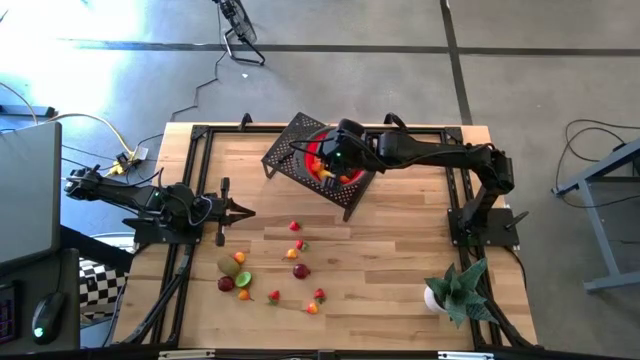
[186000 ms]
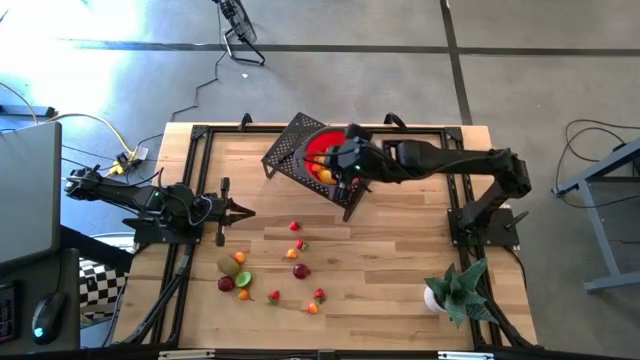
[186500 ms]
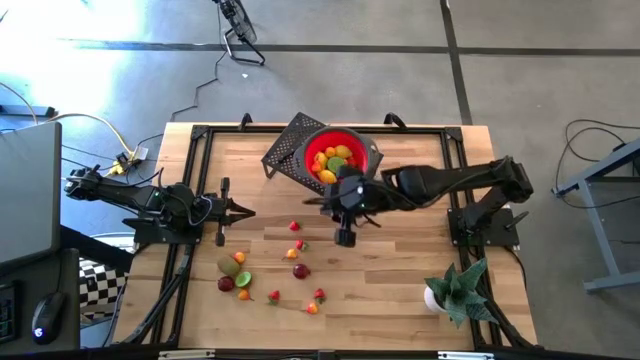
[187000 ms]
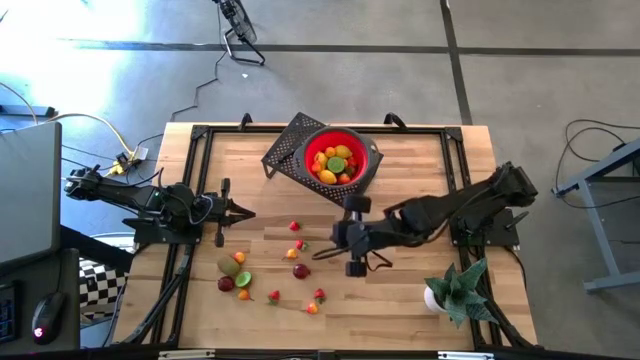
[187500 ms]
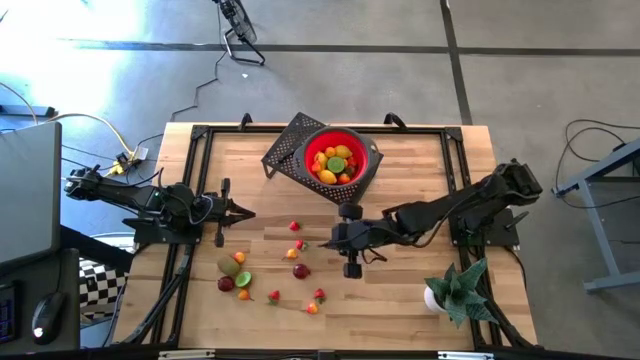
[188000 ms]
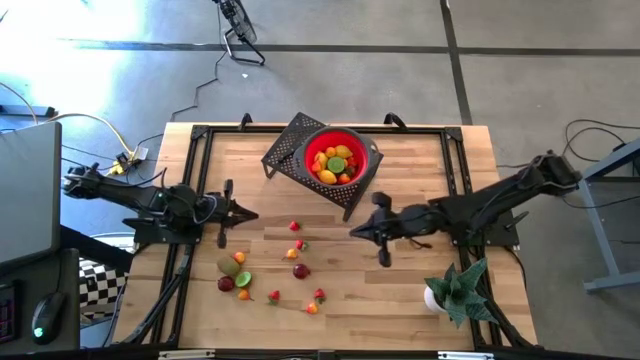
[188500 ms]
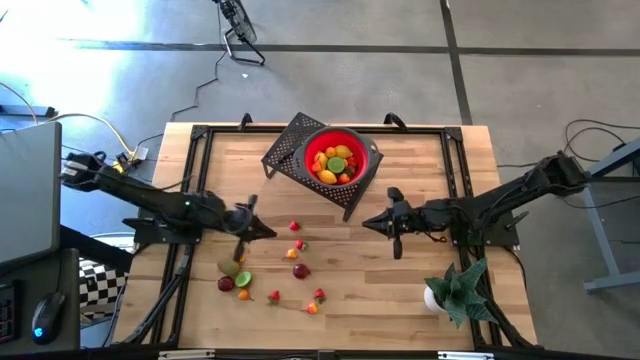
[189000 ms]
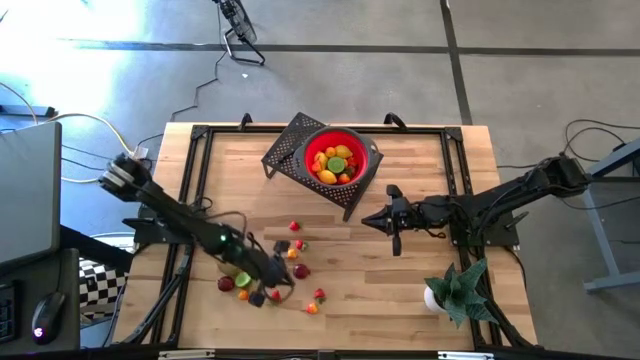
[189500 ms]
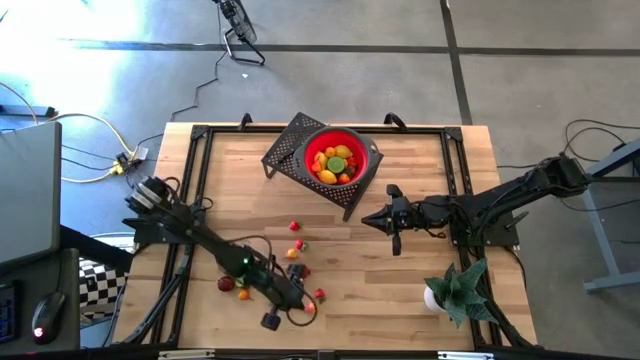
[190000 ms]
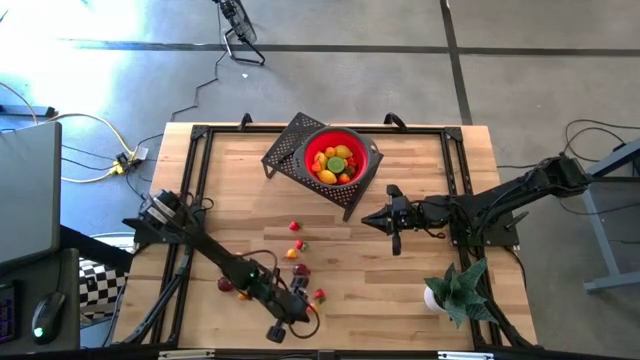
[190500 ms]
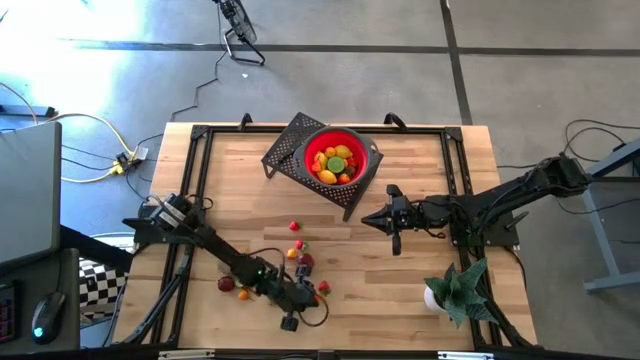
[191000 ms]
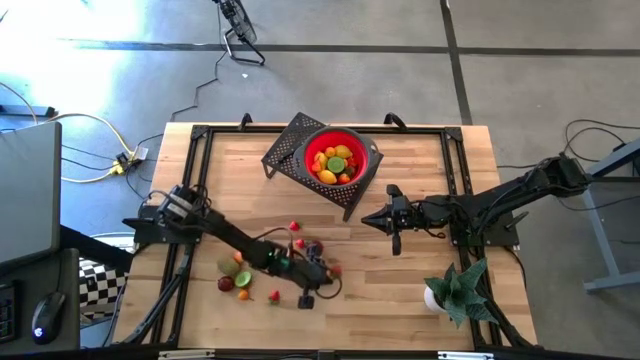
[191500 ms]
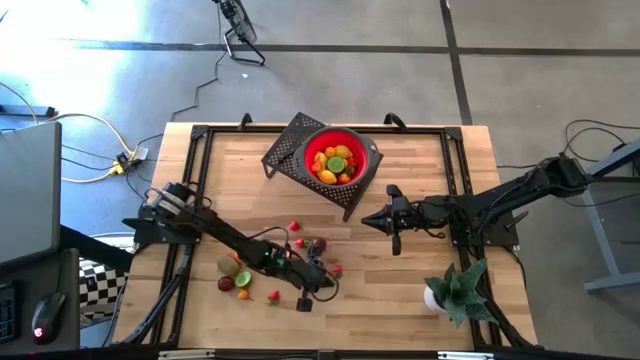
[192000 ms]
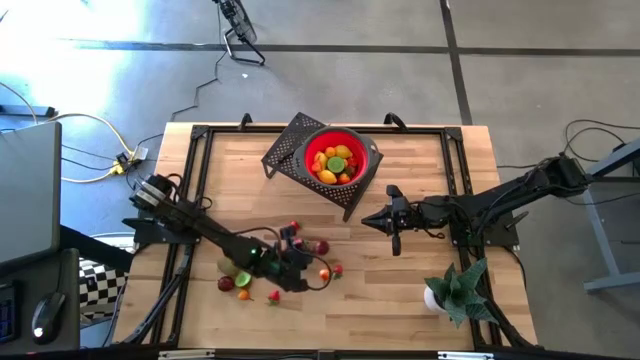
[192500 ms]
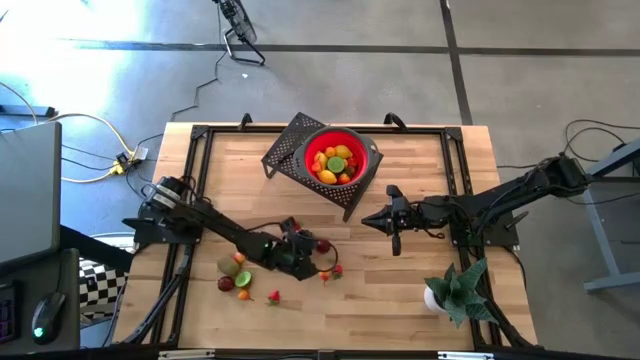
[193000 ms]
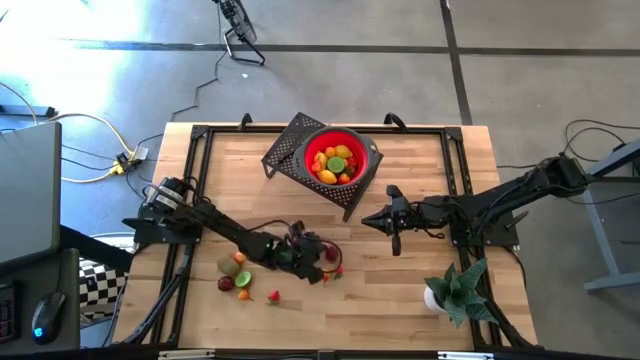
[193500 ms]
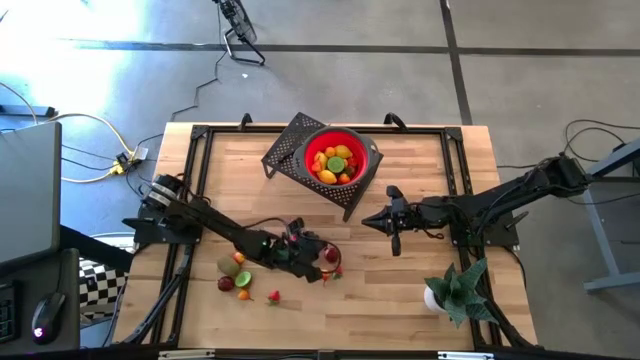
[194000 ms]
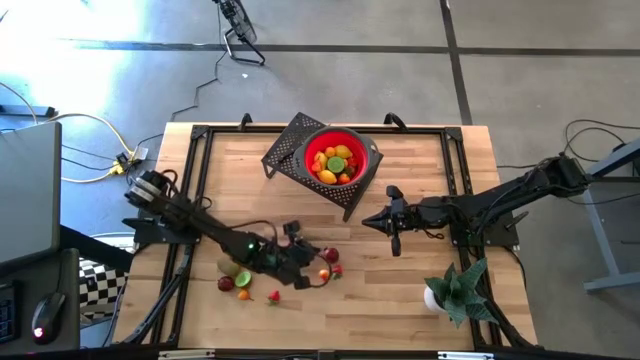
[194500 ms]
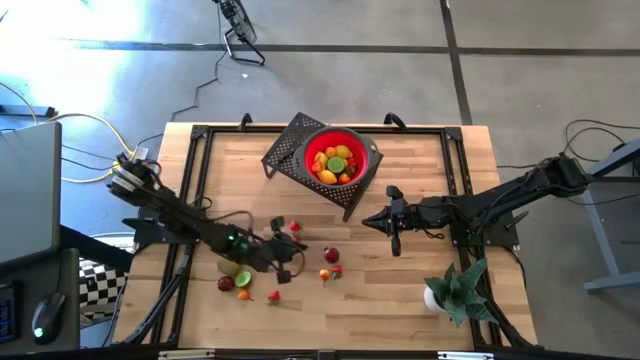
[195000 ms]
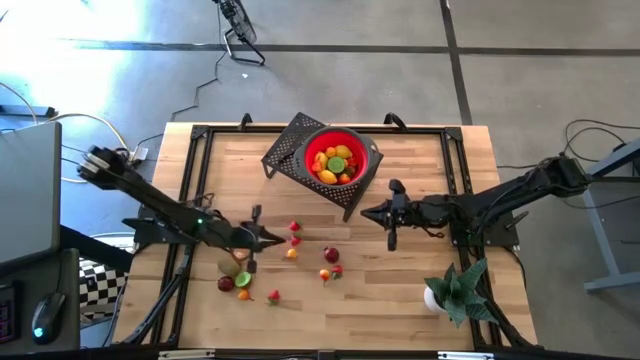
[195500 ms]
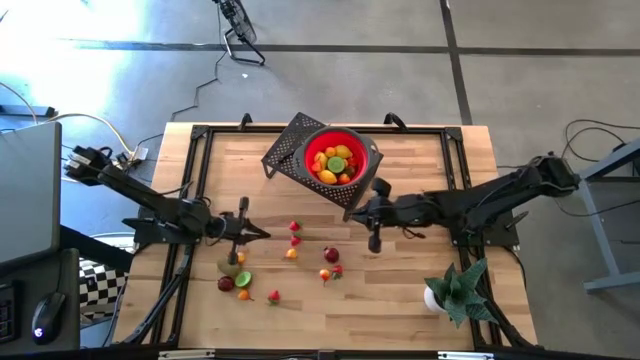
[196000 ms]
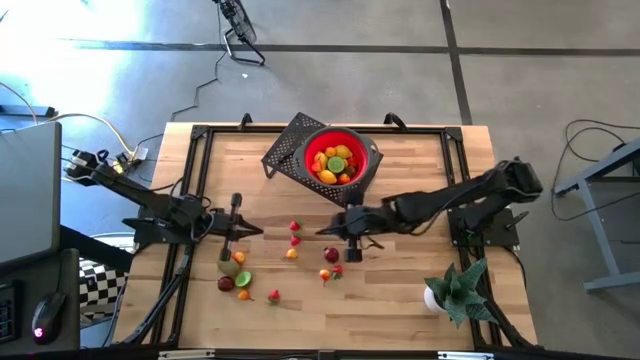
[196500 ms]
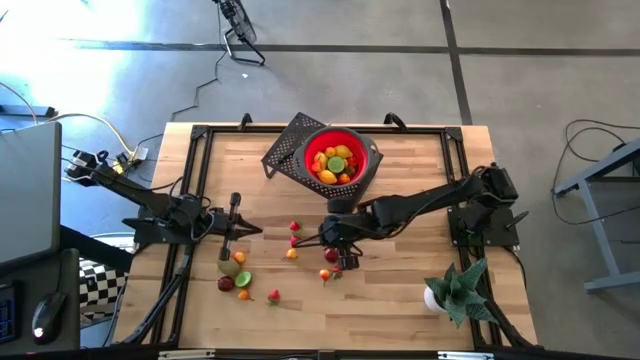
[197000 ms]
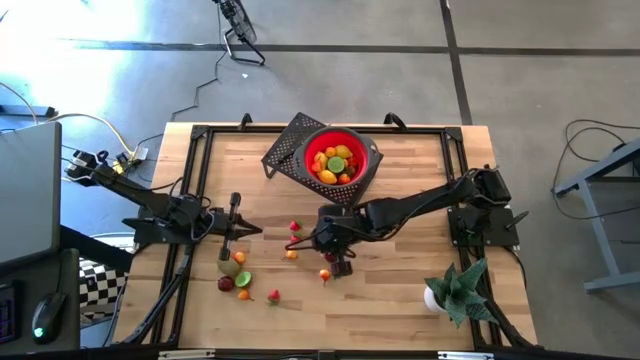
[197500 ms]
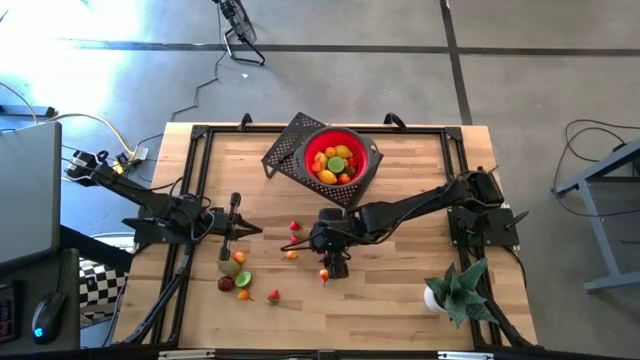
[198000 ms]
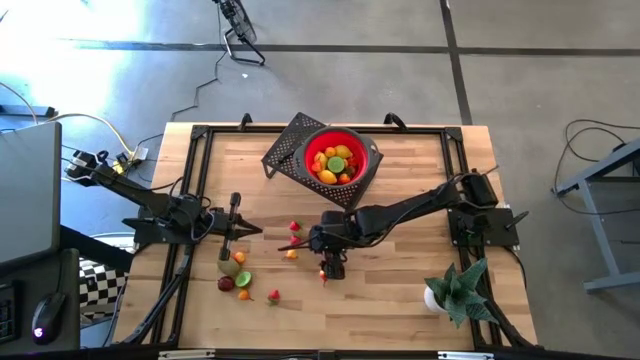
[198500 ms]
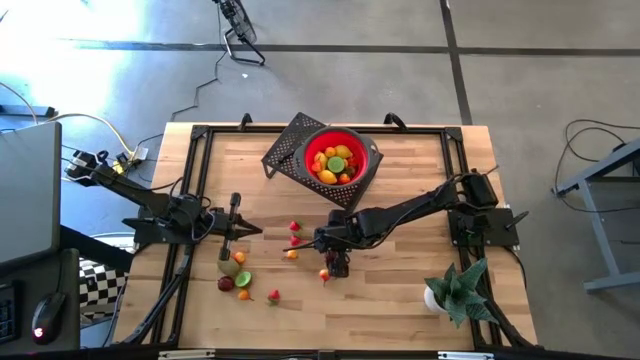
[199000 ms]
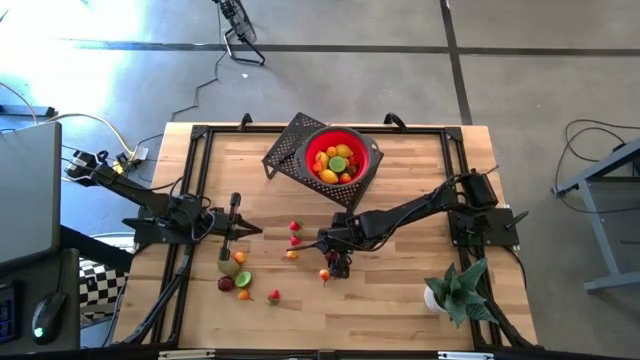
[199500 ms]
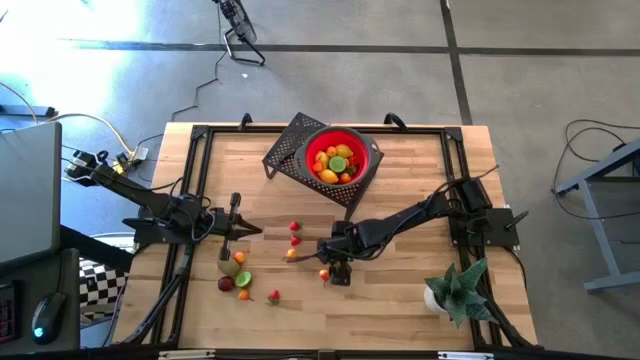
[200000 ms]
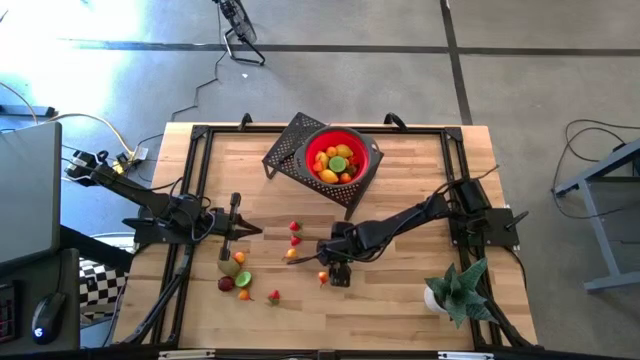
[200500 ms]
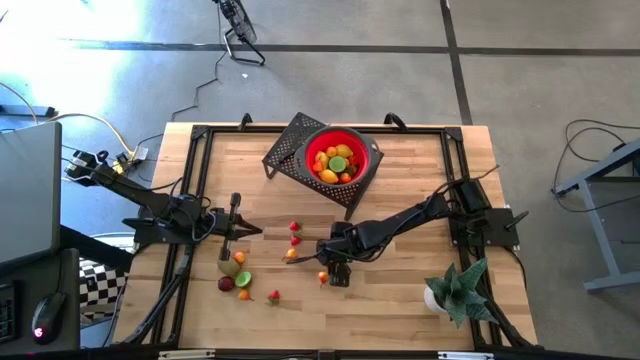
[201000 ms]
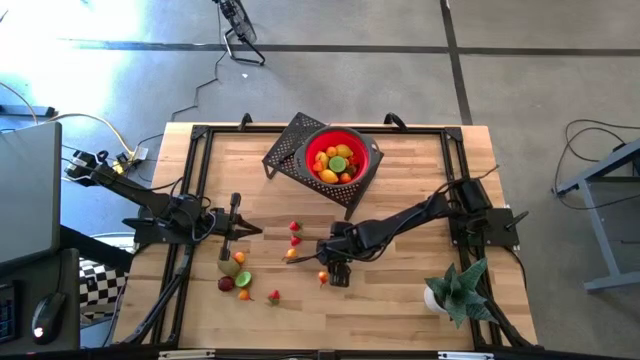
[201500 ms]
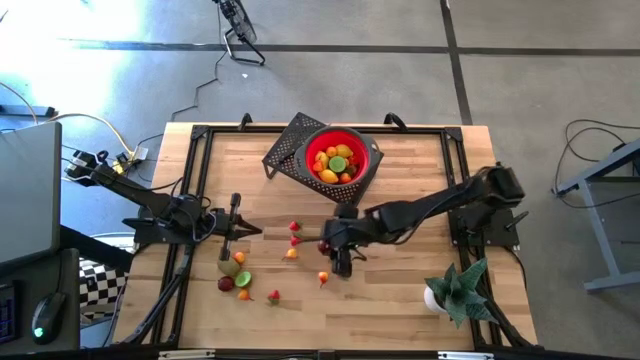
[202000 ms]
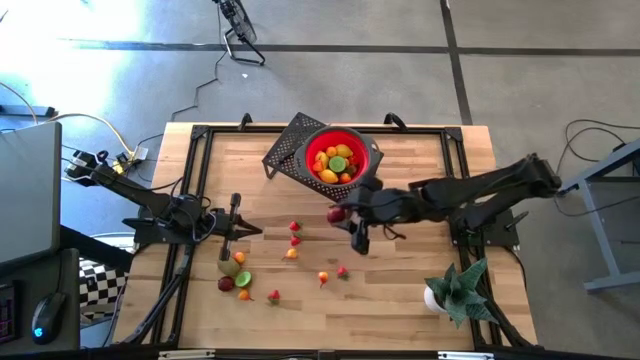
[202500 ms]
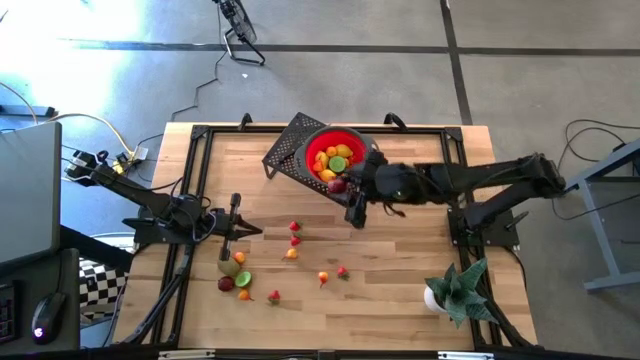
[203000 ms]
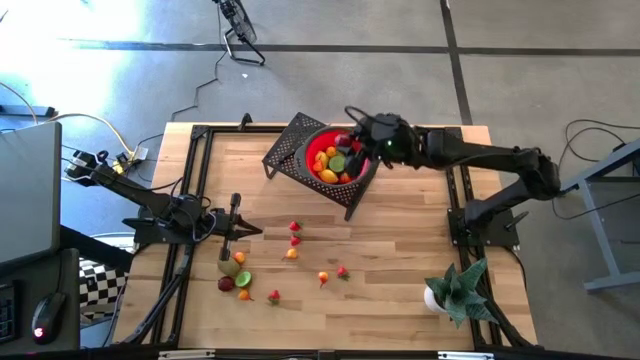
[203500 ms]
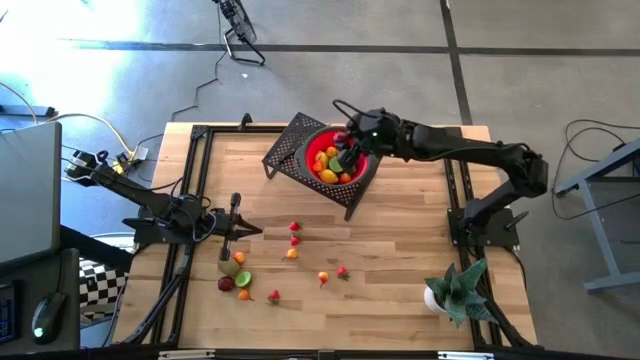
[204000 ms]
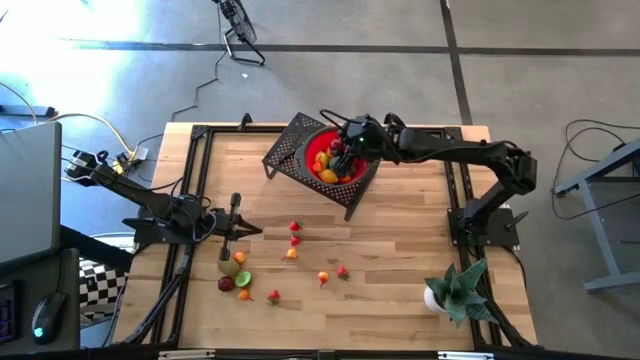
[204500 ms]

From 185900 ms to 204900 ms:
Task: Pick & Place Fruit
Put the pomegranate into the strainer bowl on the shelf

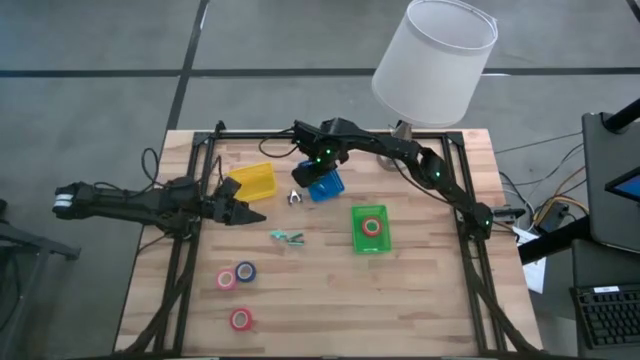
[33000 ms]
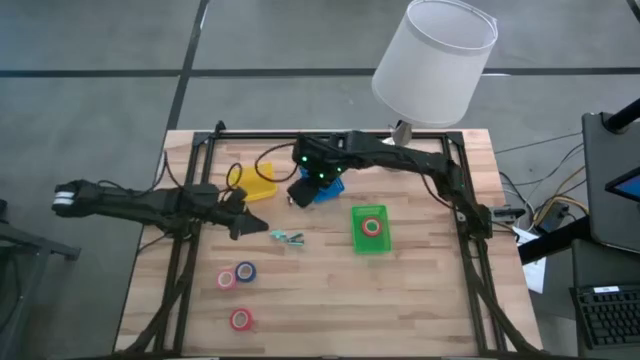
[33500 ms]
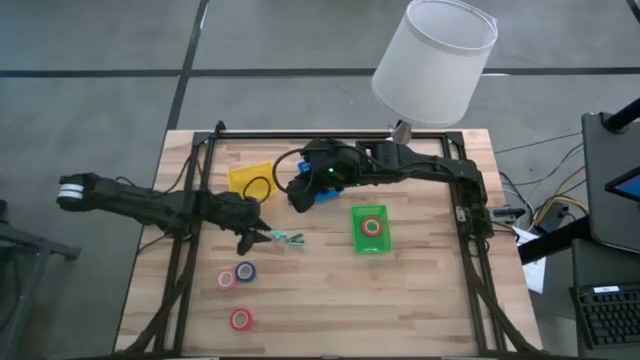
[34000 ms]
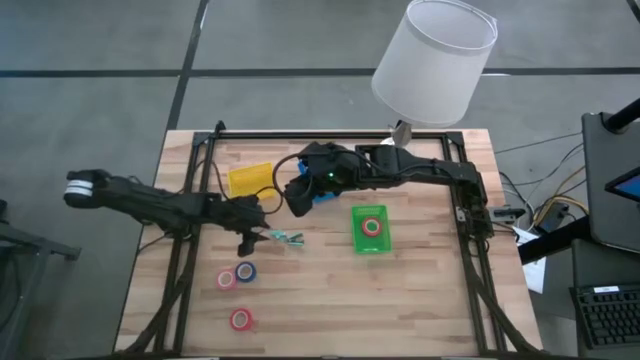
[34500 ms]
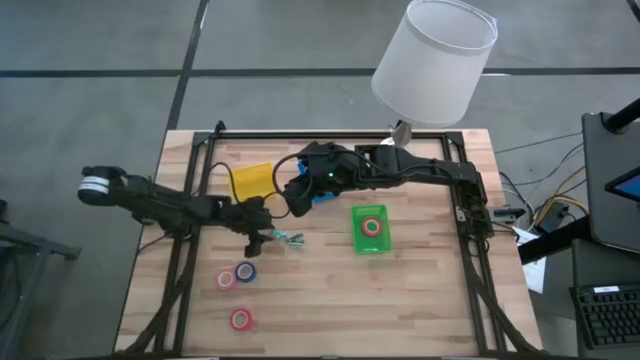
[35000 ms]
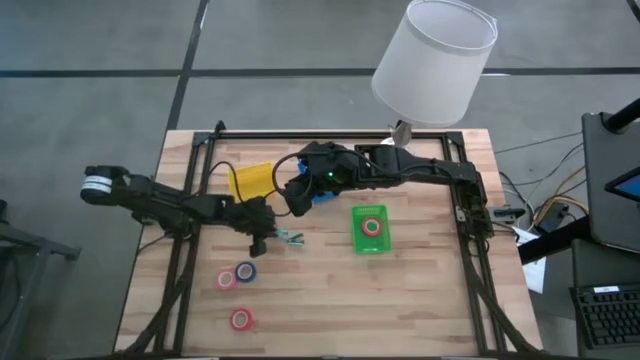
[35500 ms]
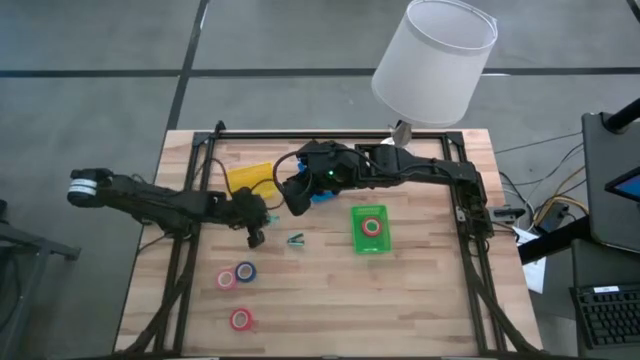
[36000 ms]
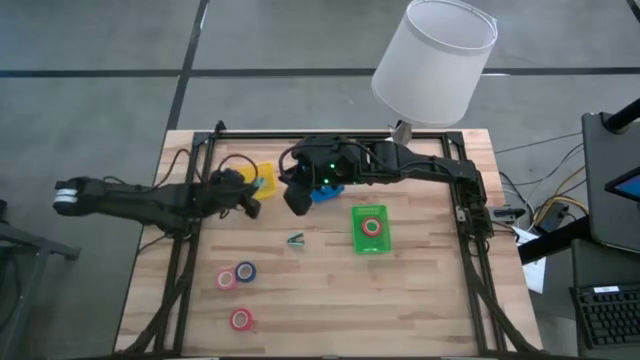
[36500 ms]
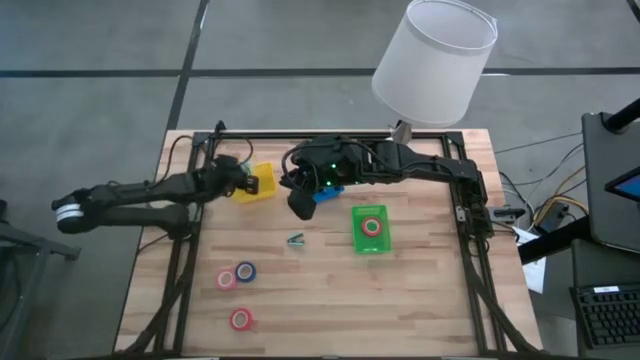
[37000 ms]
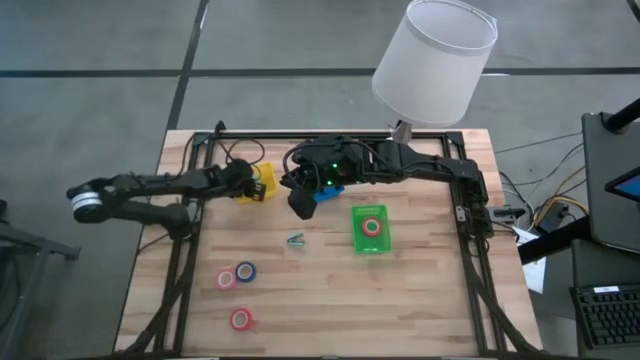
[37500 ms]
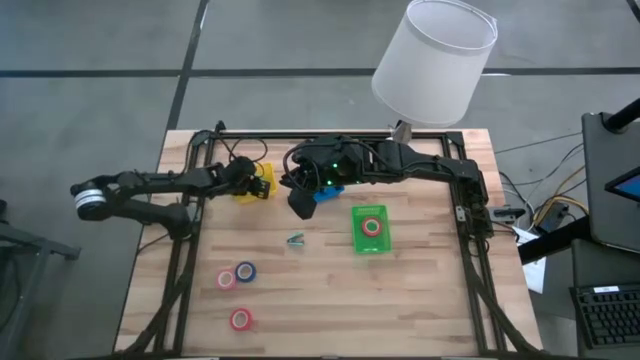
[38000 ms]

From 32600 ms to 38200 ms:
Task: Pick and place Stapler, Stapler remover, tape
Put the blue staple remover into the yellow bin
